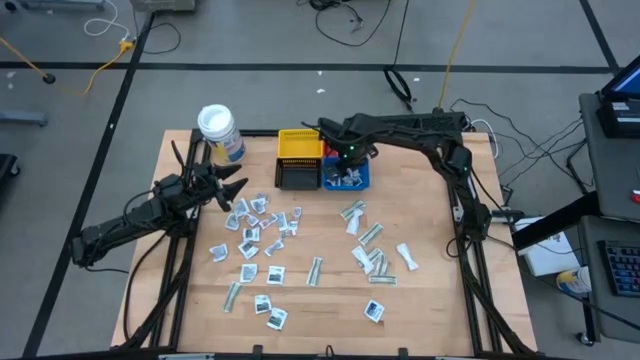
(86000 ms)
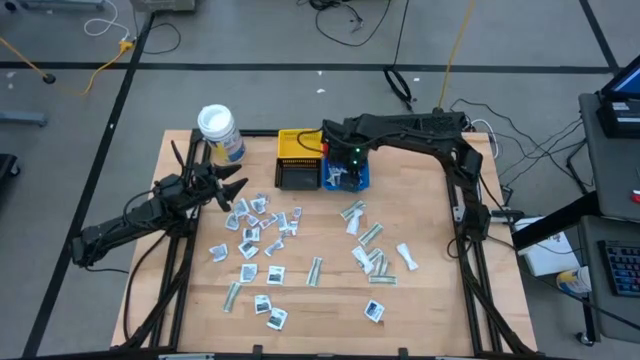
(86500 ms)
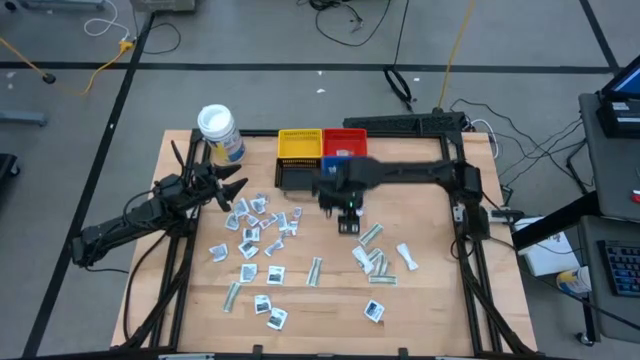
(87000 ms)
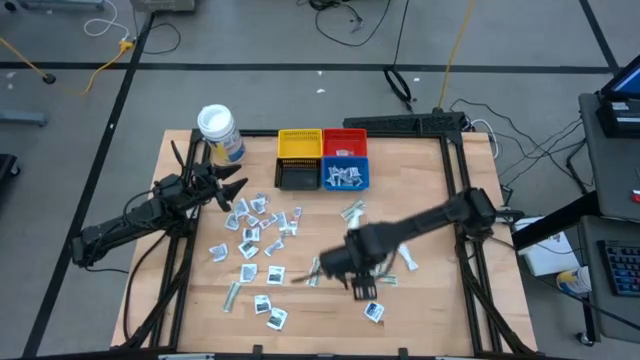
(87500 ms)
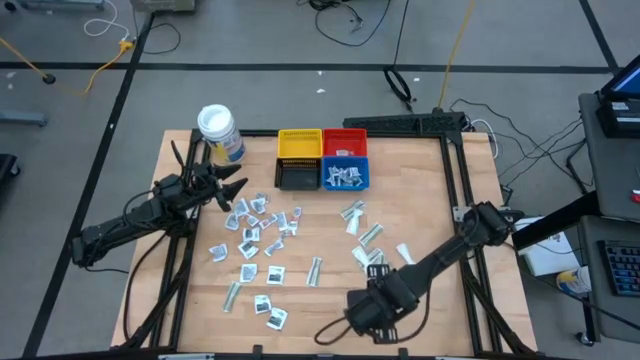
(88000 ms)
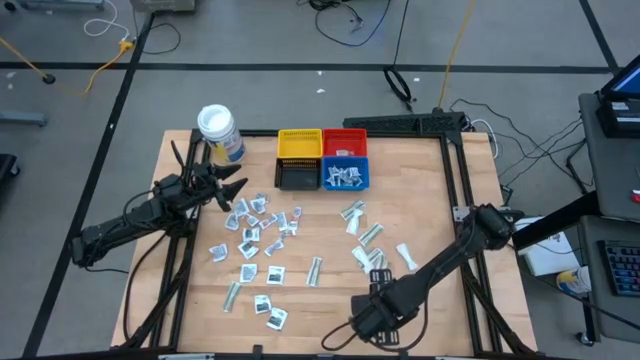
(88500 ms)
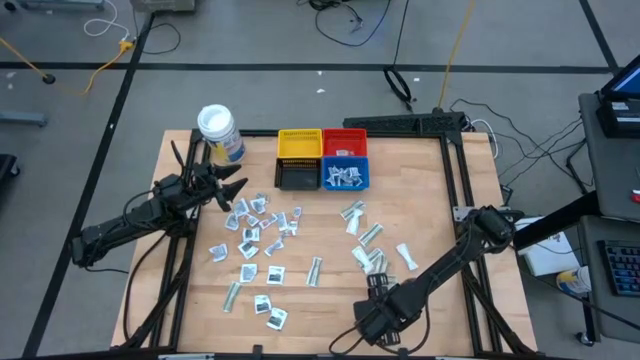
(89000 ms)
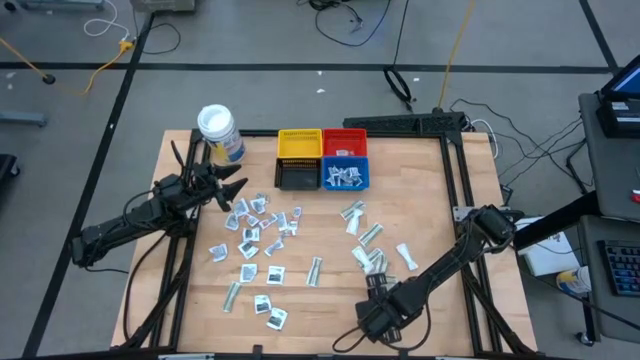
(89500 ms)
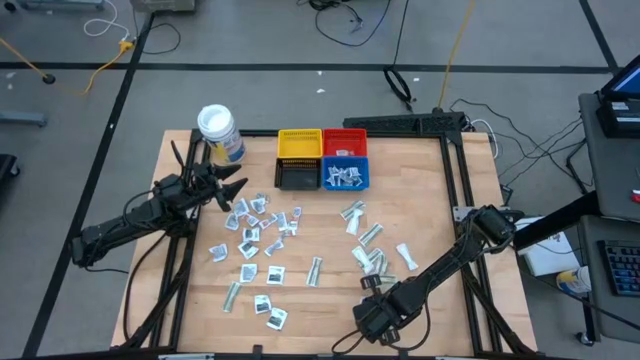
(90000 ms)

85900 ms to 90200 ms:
Task: Pick & Place First Aid Supplies
Put the blue alcohol pad into the blue basket

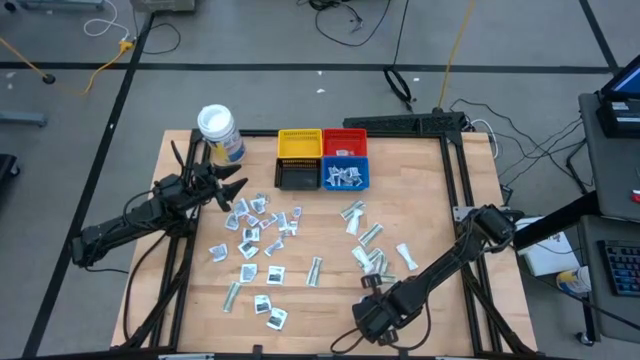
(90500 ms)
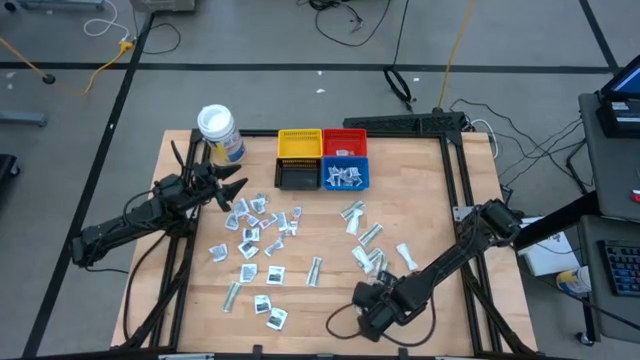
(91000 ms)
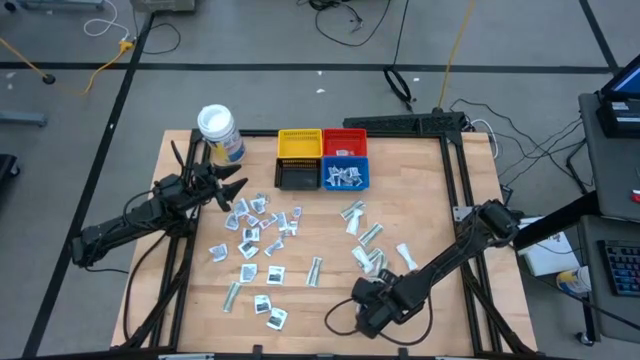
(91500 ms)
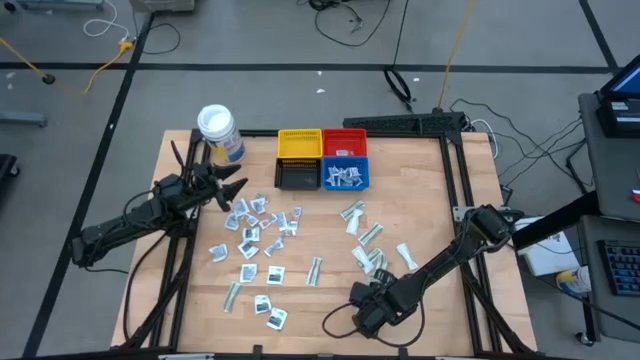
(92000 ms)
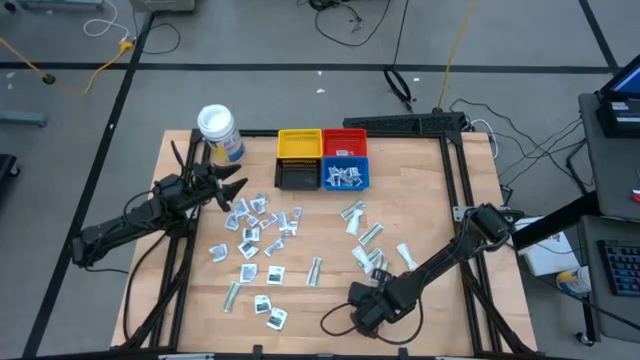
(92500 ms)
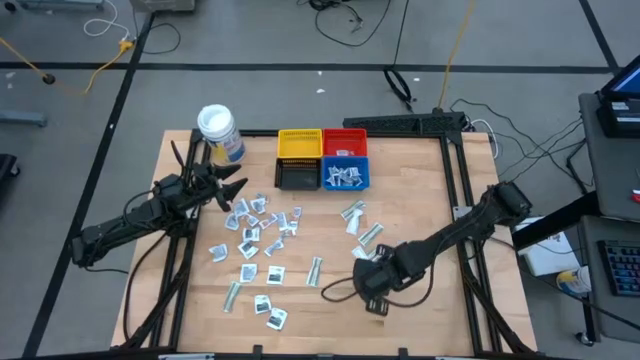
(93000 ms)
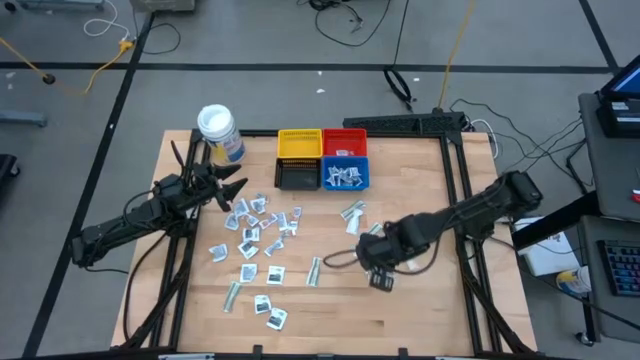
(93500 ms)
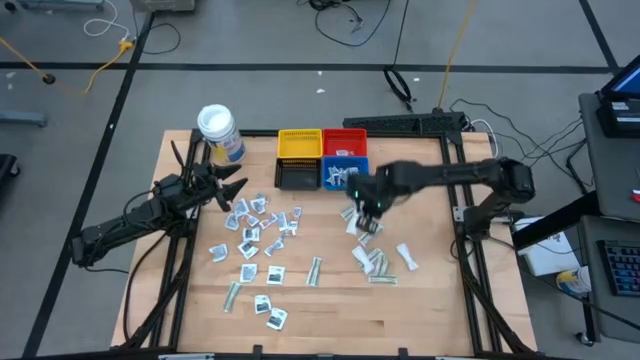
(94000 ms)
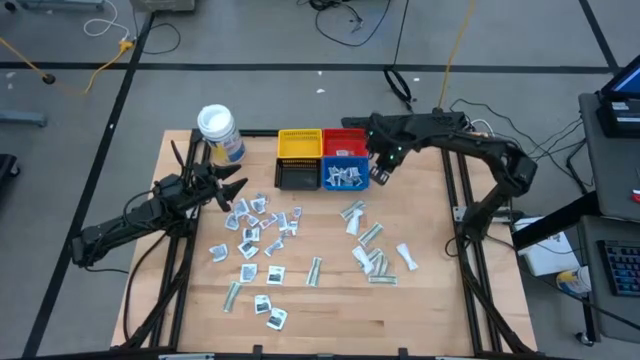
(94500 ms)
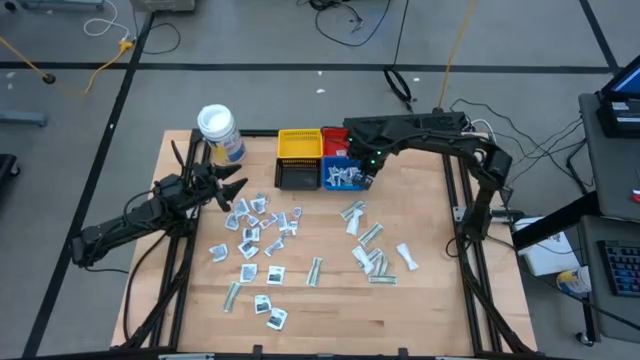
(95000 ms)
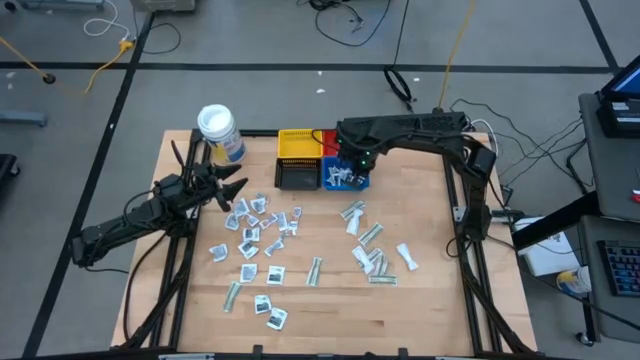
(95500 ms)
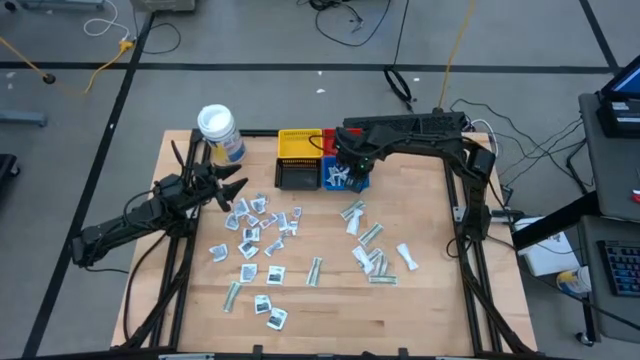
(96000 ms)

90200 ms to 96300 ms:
Put the blue alcohol pad into the blue basket

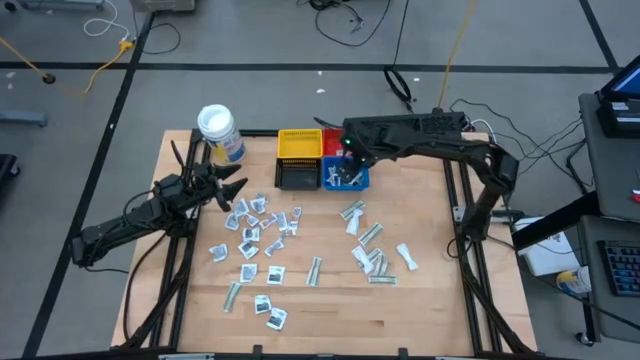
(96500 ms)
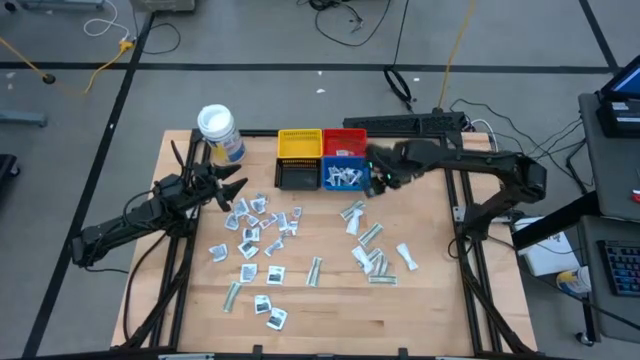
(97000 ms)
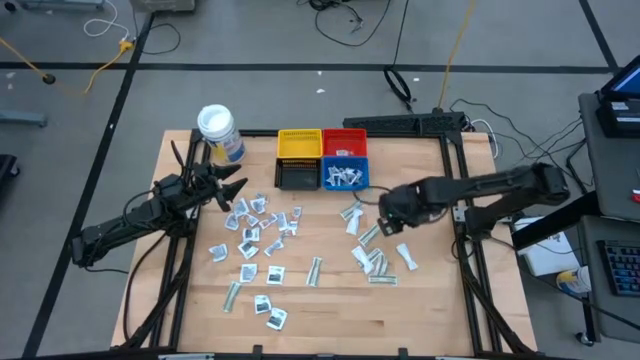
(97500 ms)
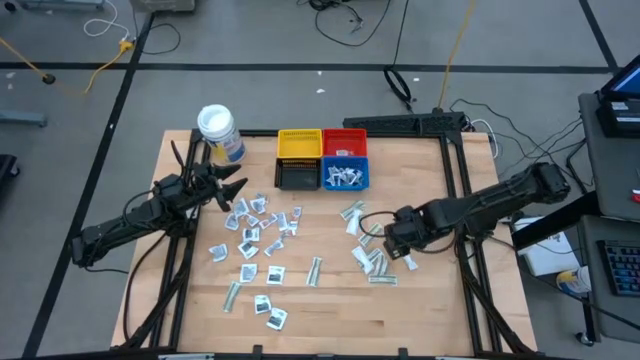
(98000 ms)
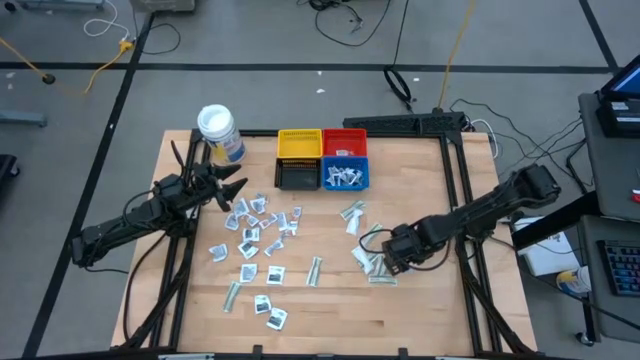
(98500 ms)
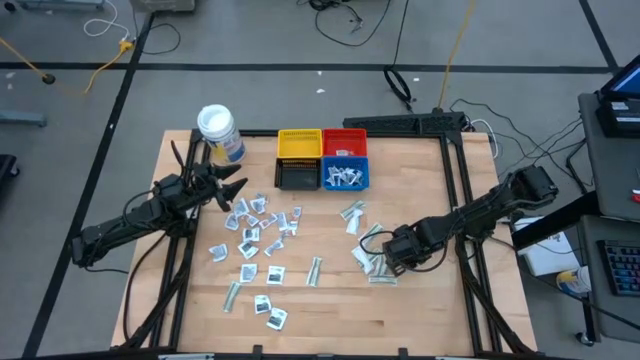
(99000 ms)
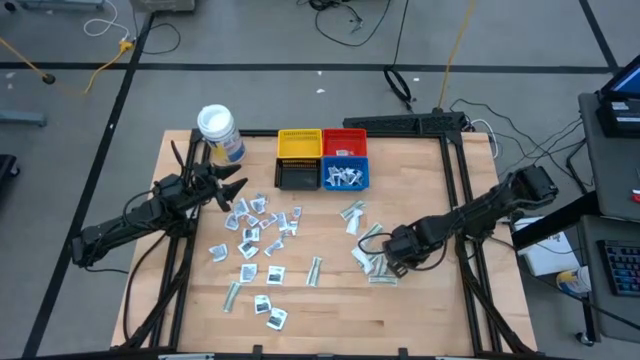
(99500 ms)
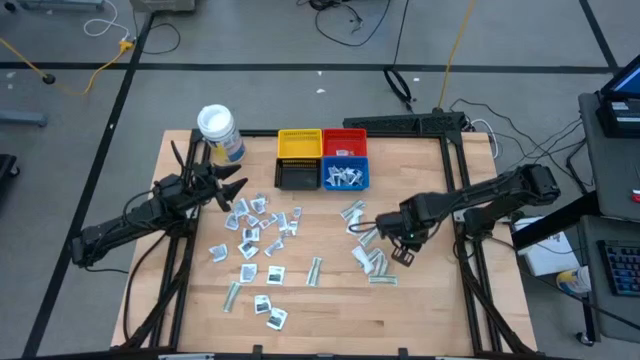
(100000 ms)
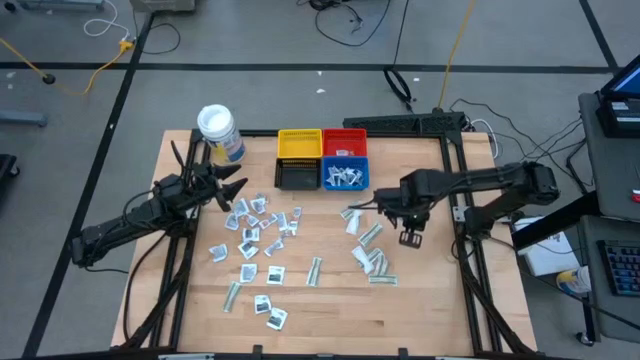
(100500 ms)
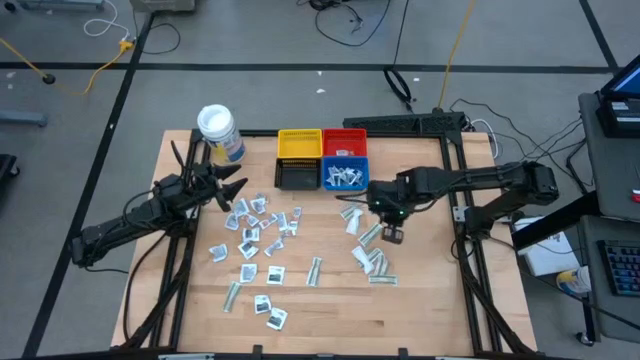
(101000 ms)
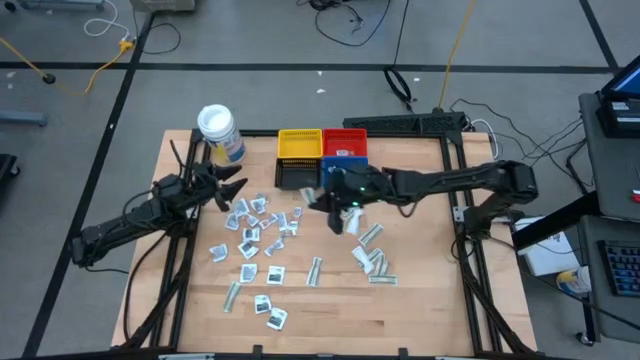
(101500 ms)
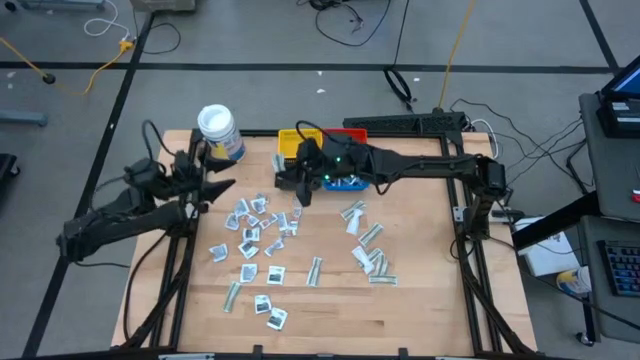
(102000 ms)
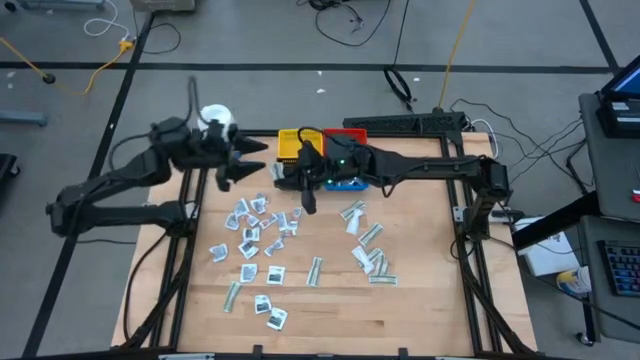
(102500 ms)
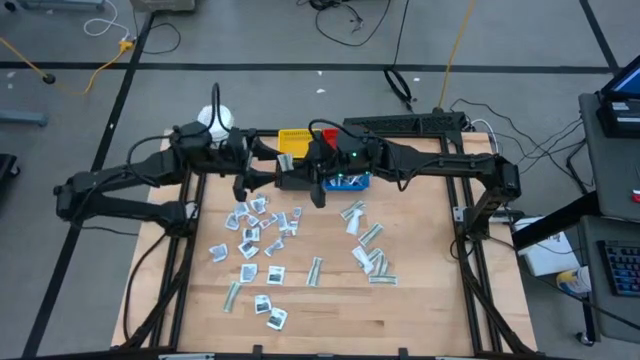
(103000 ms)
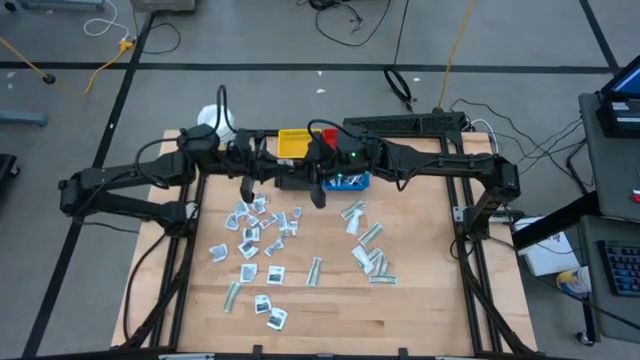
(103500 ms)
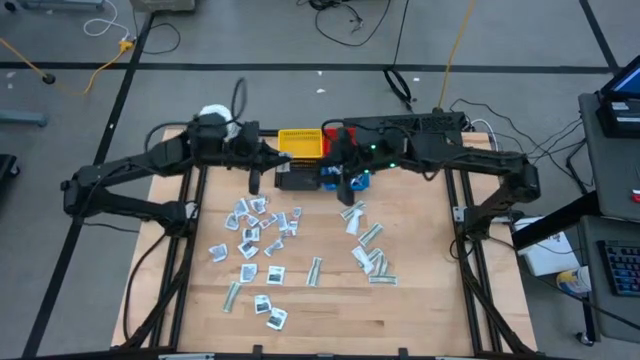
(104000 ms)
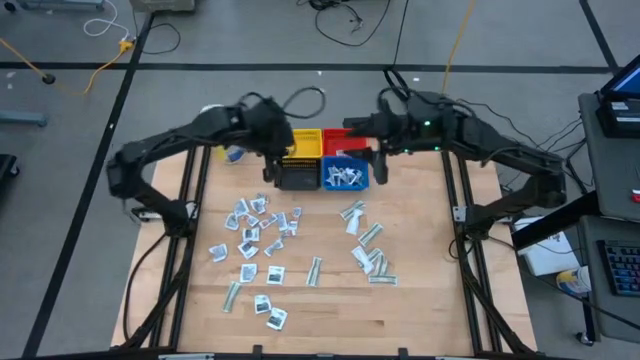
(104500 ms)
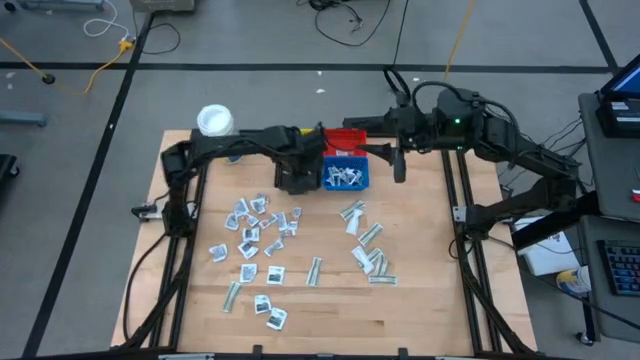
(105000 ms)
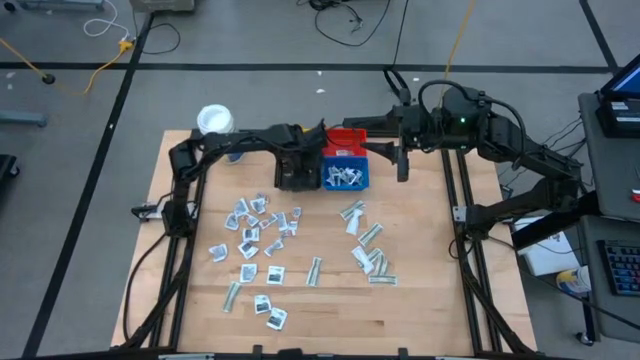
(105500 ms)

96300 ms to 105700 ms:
Put the green bandage pack into the black basket

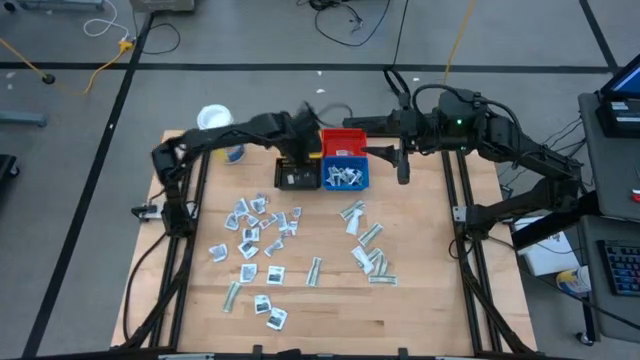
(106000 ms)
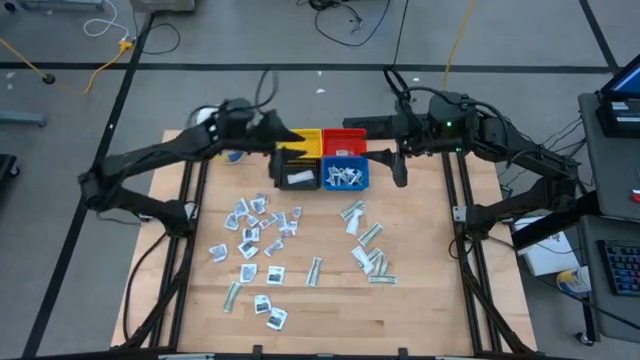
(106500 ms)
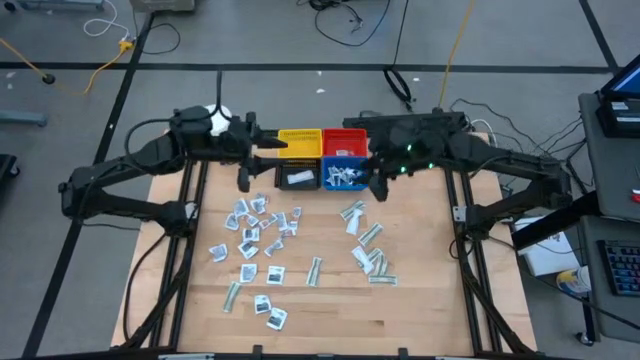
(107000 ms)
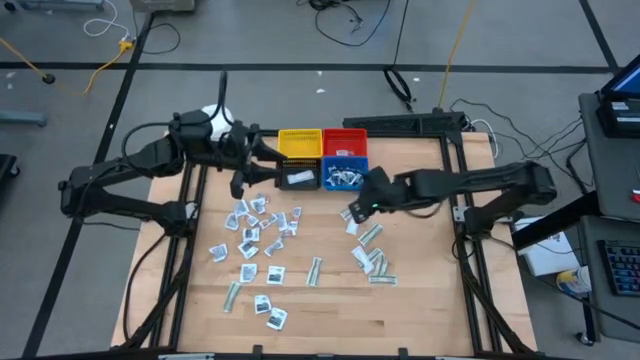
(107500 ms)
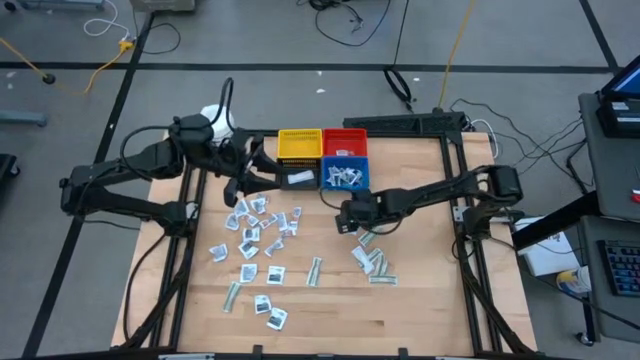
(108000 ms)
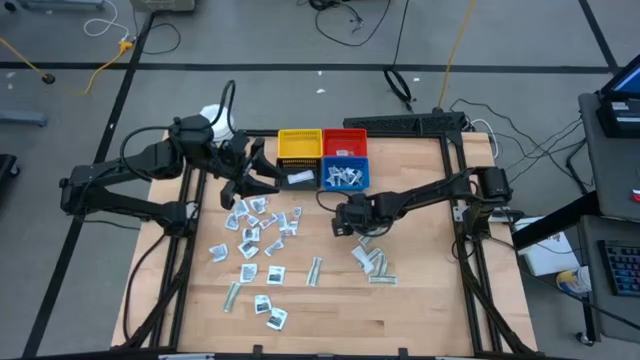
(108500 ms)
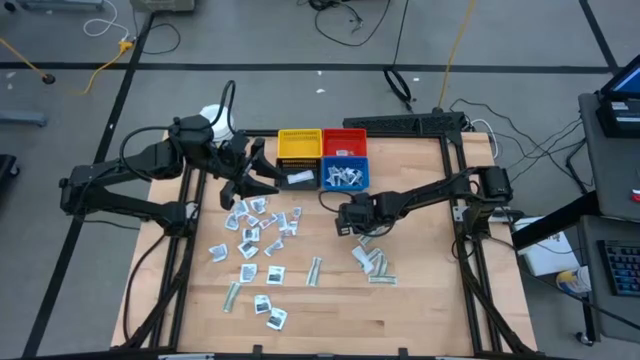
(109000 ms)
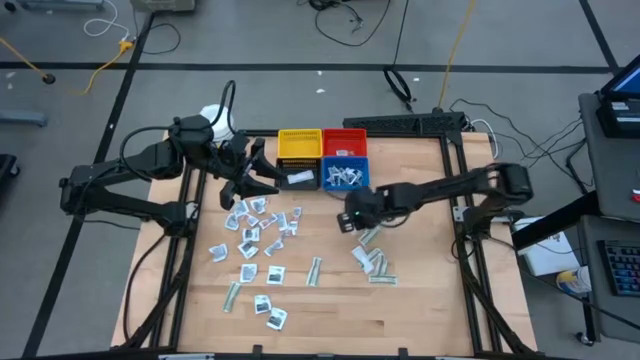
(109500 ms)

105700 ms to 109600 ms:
Put the green bandage pack into the black basket
